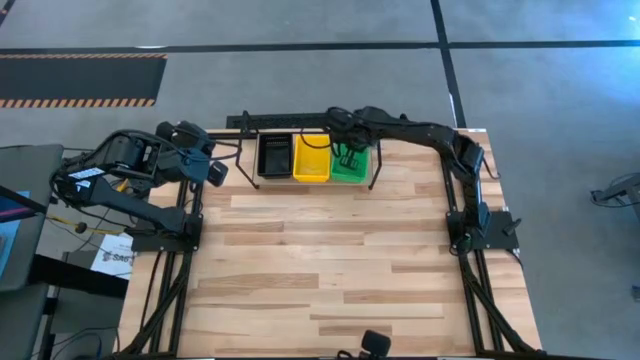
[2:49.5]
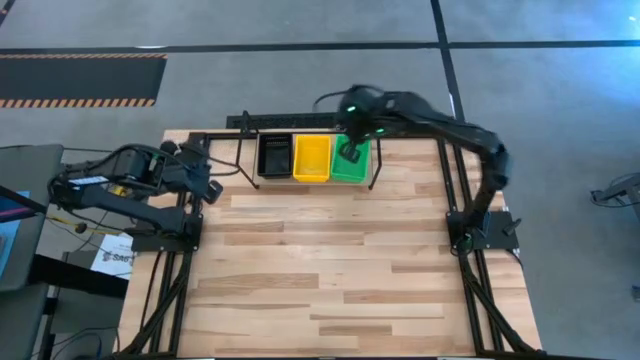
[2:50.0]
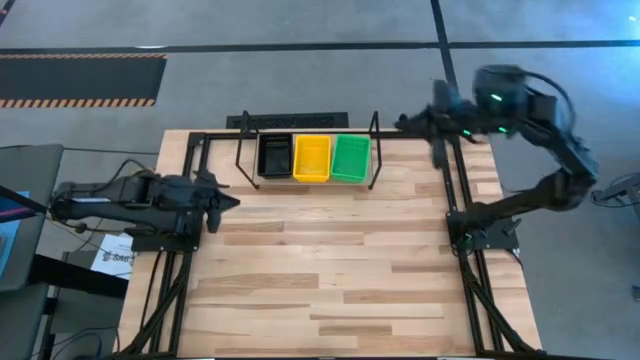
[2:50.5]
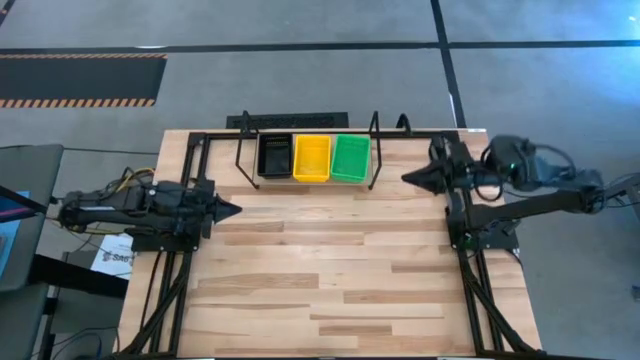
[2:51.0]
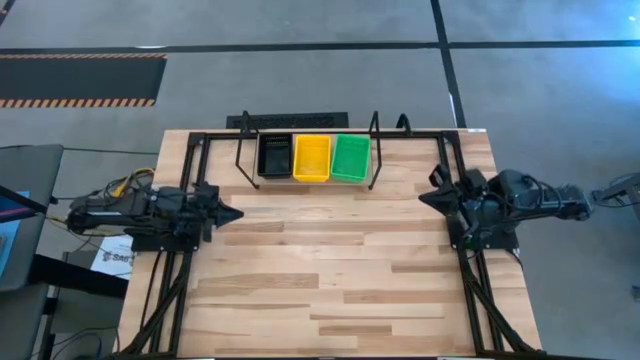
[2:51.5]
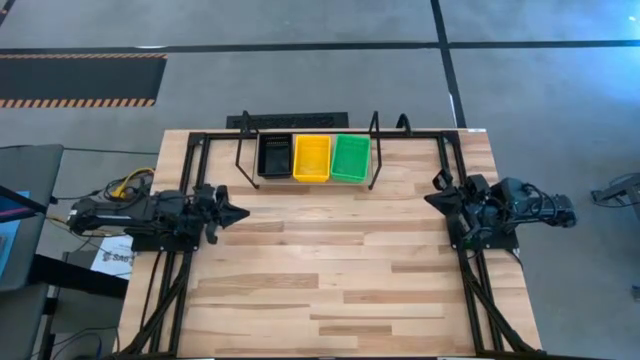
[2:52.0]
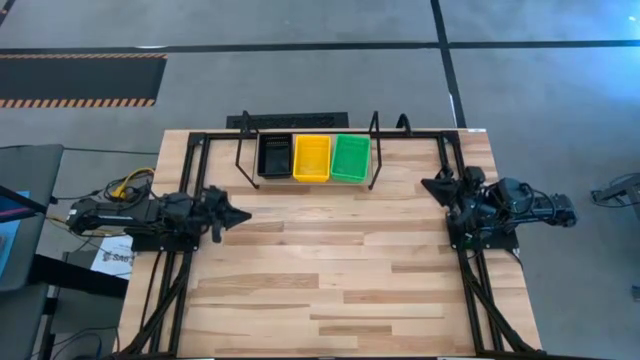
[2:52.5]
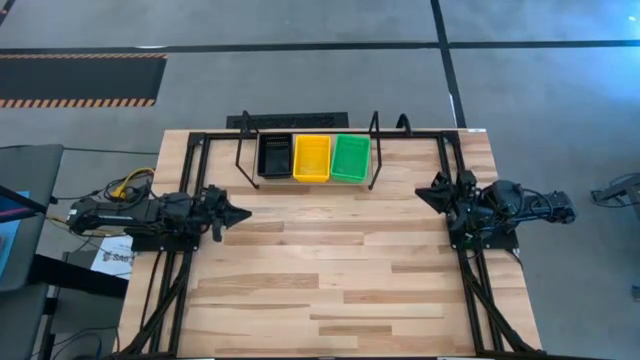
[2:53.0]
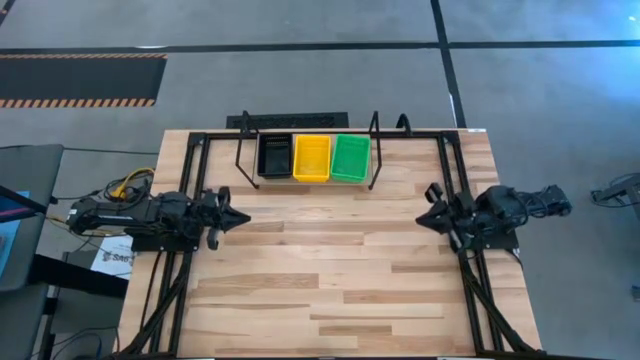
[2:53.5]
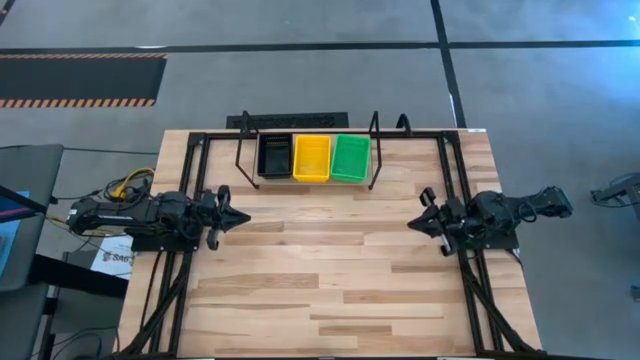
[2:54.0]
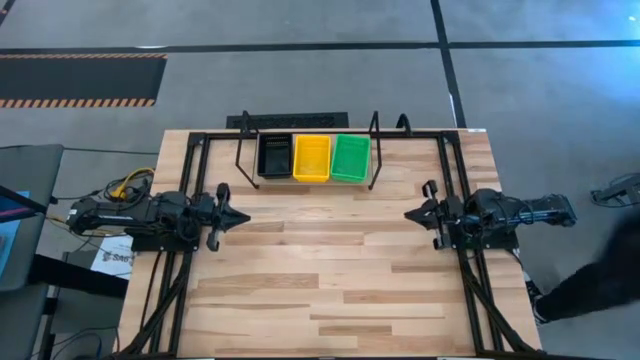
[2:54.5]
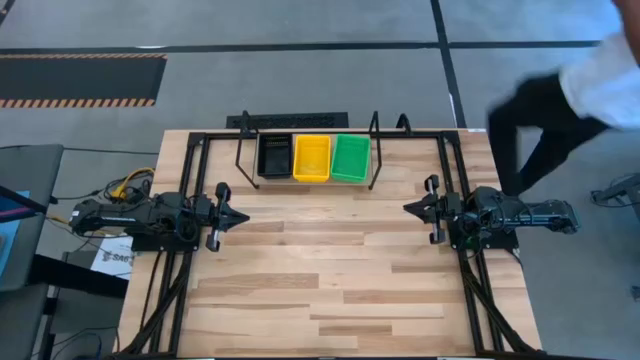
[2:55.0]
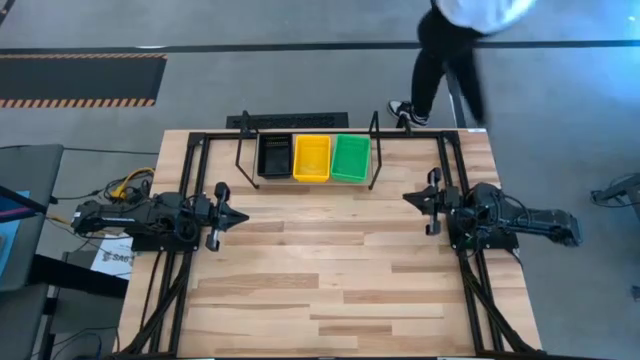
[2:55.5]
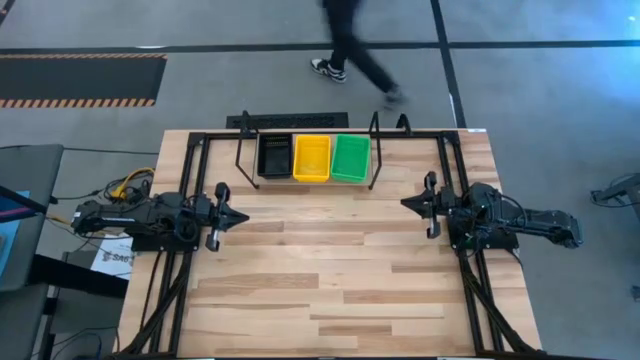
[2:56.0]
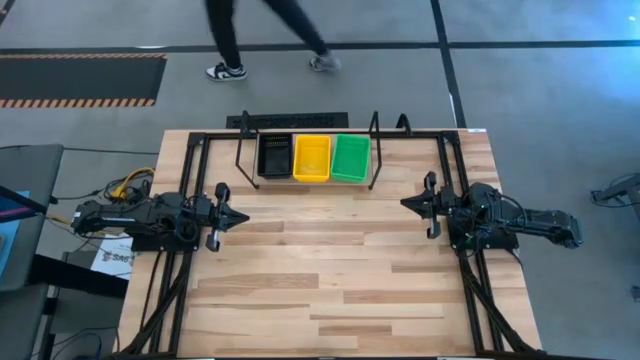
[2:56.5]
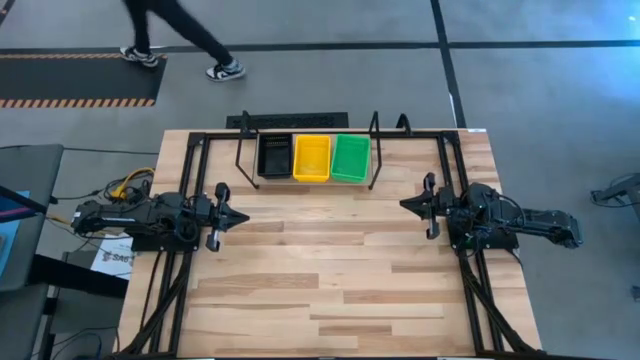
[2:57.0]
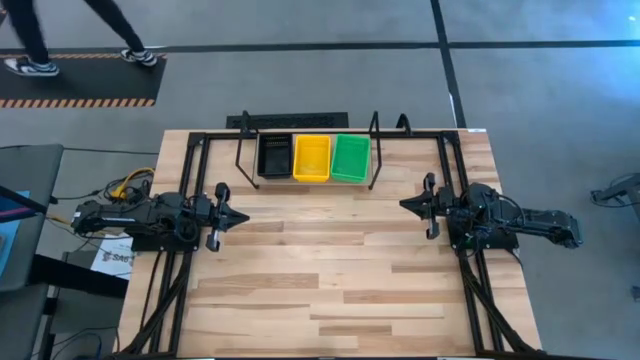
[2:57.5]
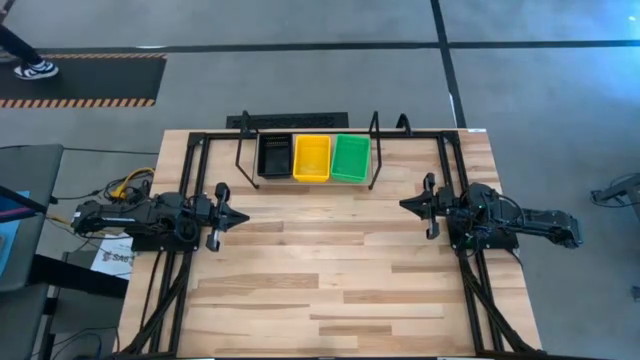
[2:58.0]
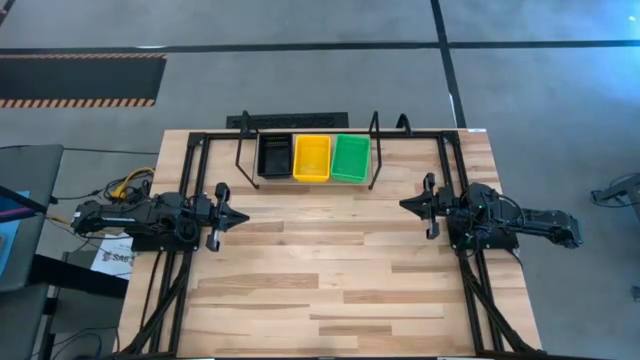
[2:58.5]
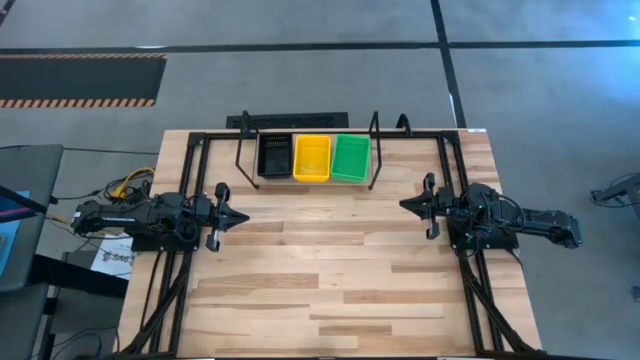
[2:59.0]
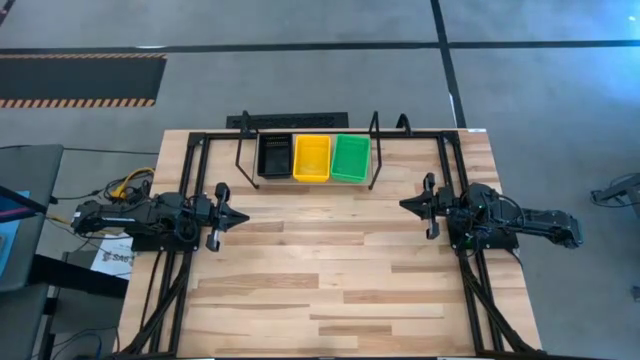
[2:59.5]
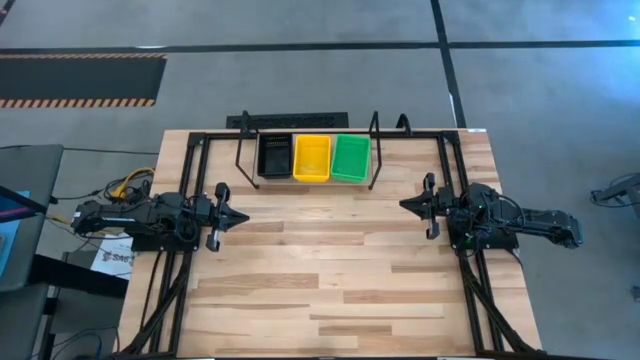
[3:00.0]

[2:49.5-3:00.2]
Task: Stack baskets on shelf by color
Return to Home Position

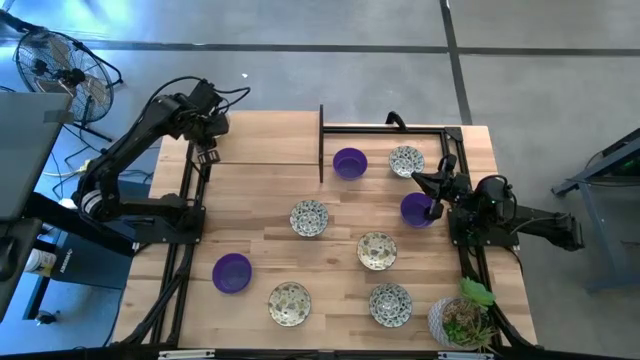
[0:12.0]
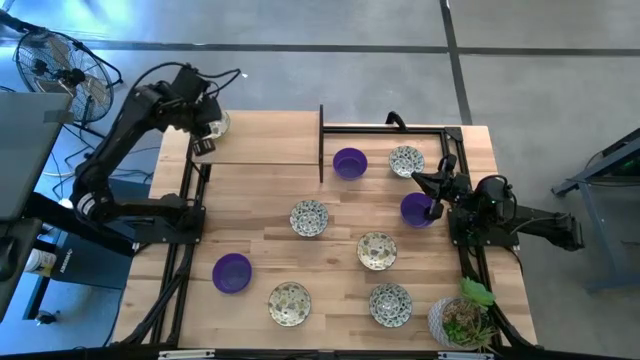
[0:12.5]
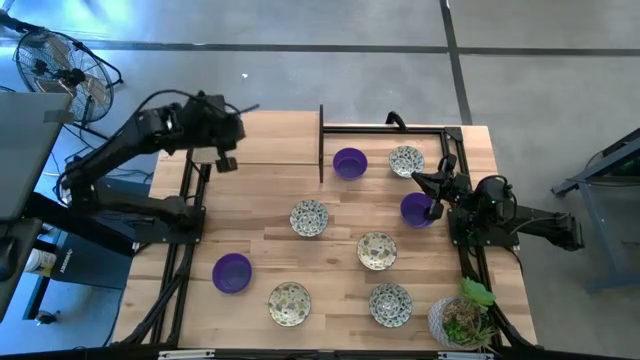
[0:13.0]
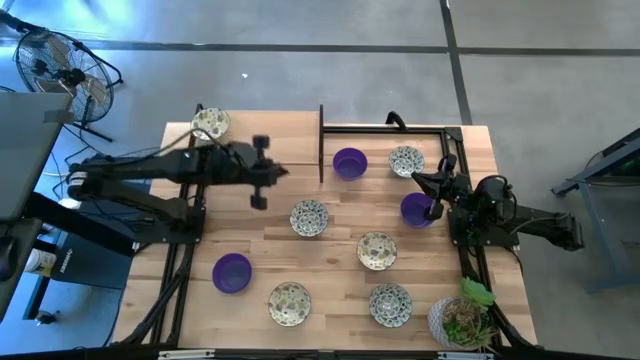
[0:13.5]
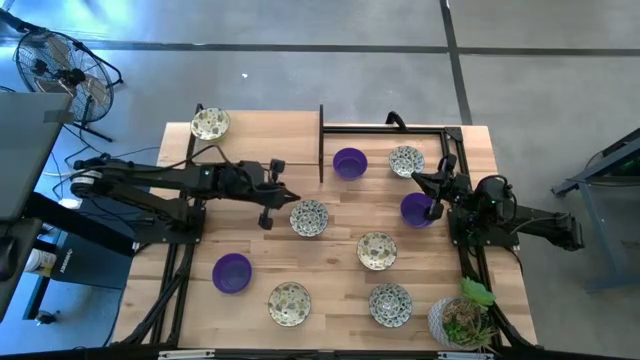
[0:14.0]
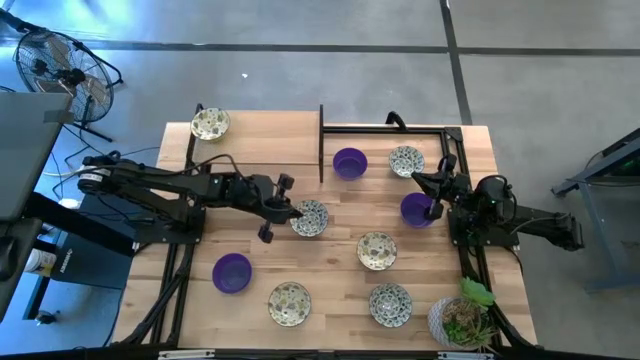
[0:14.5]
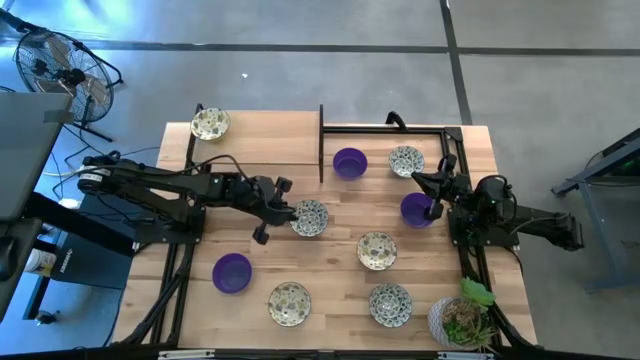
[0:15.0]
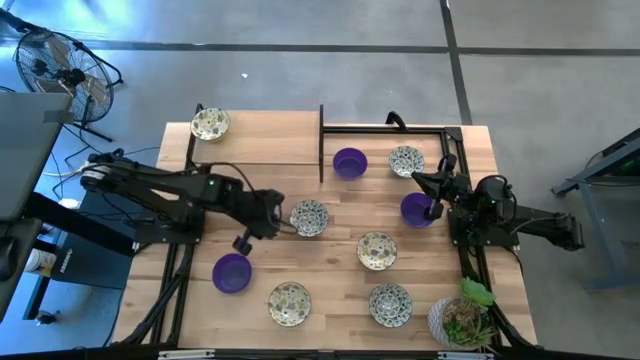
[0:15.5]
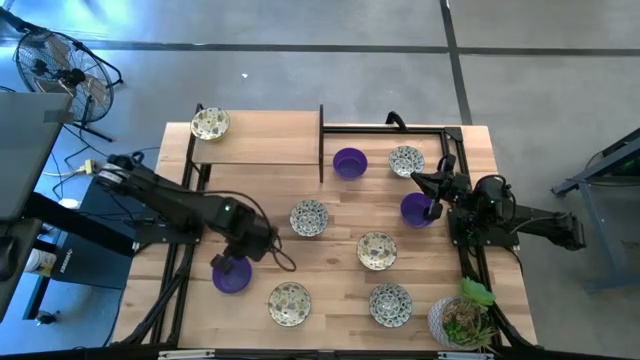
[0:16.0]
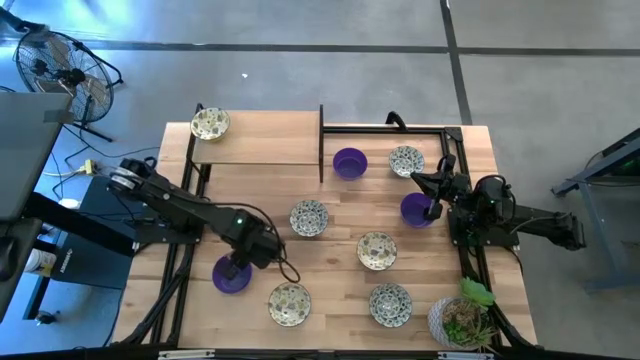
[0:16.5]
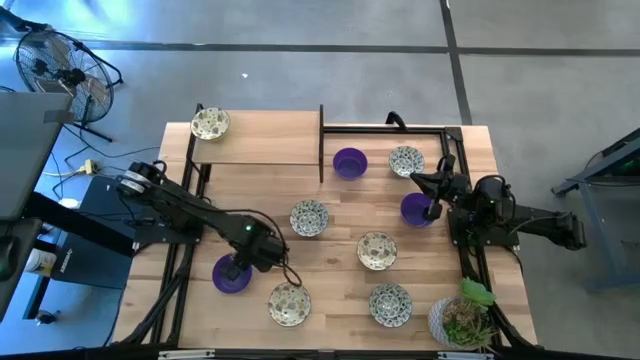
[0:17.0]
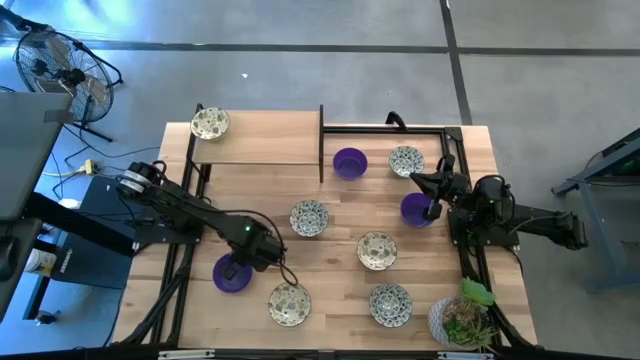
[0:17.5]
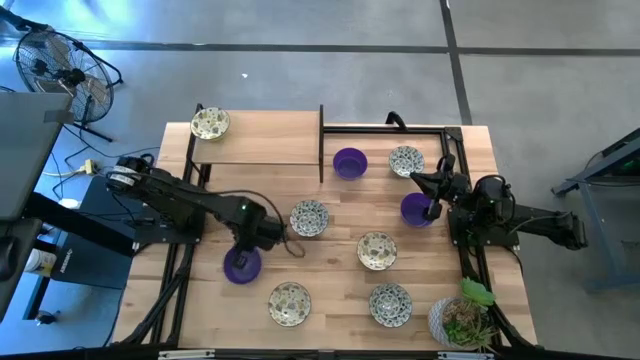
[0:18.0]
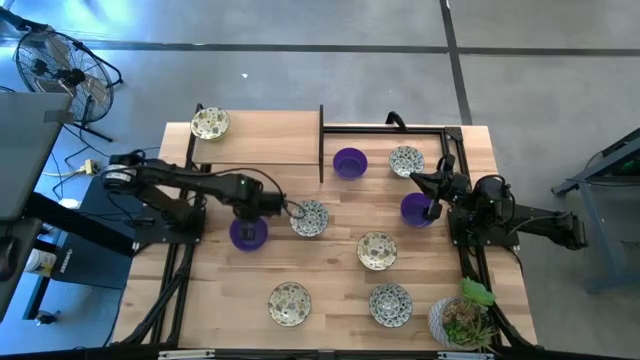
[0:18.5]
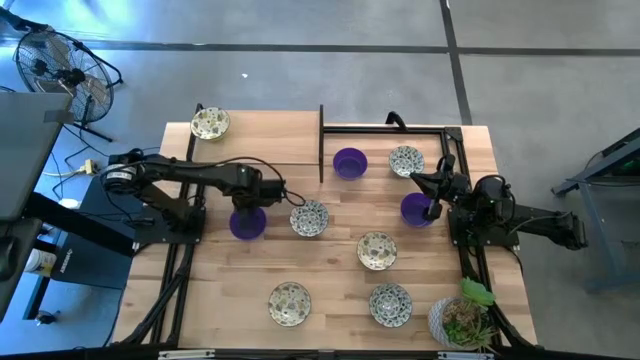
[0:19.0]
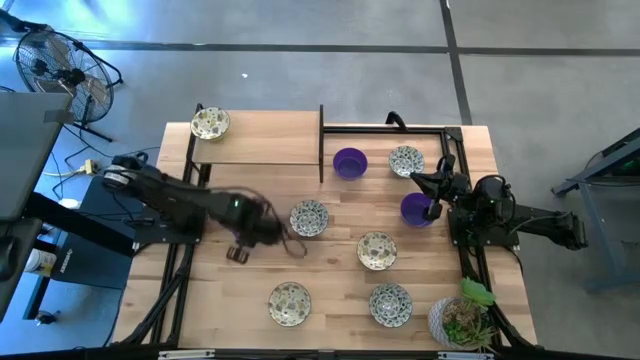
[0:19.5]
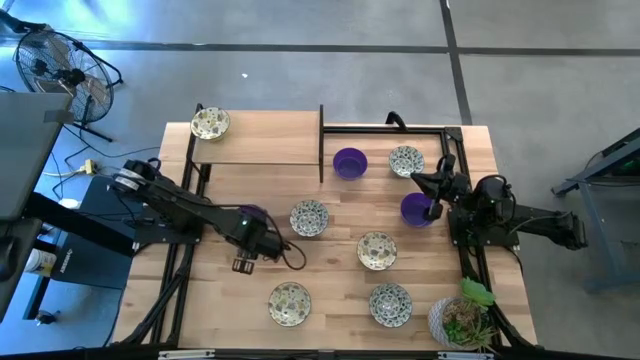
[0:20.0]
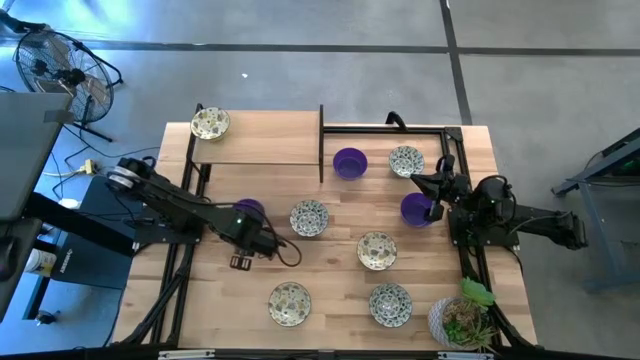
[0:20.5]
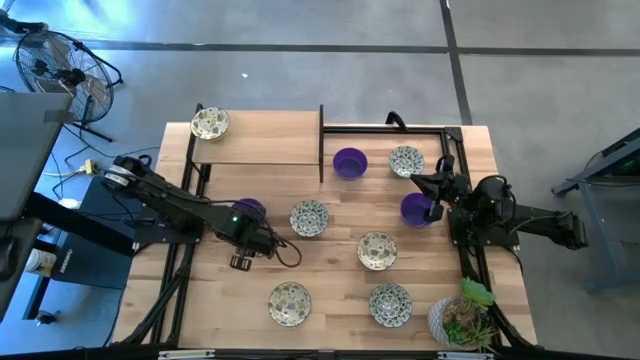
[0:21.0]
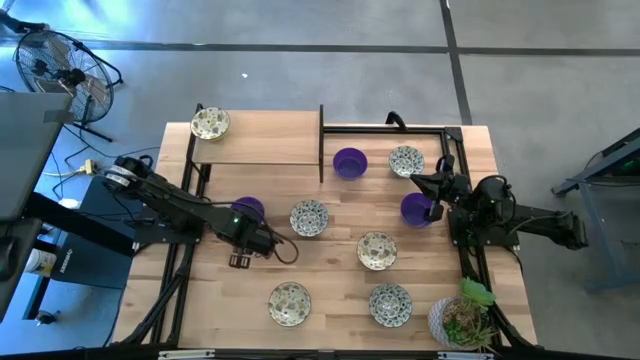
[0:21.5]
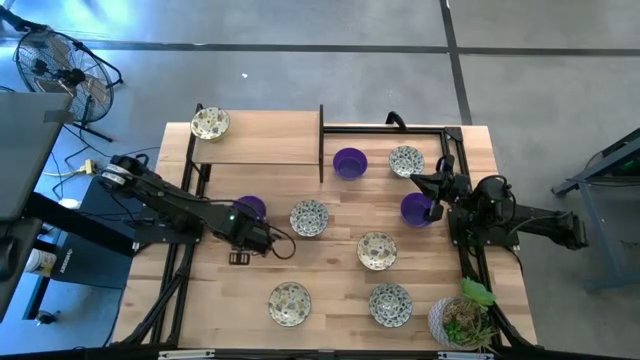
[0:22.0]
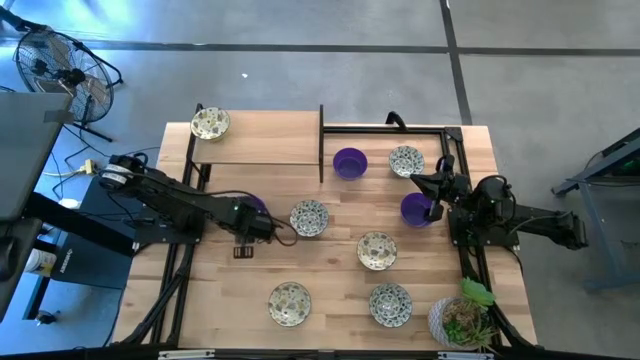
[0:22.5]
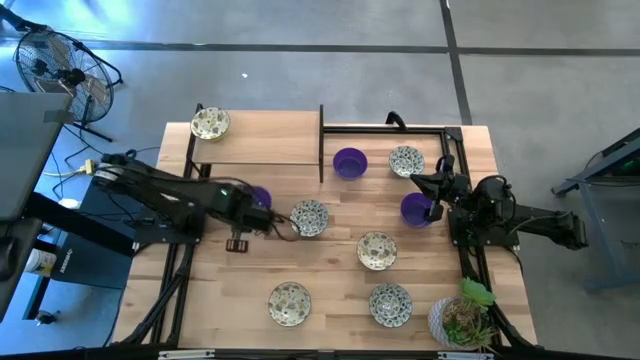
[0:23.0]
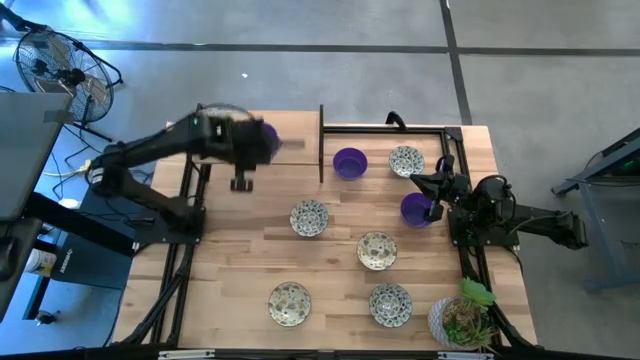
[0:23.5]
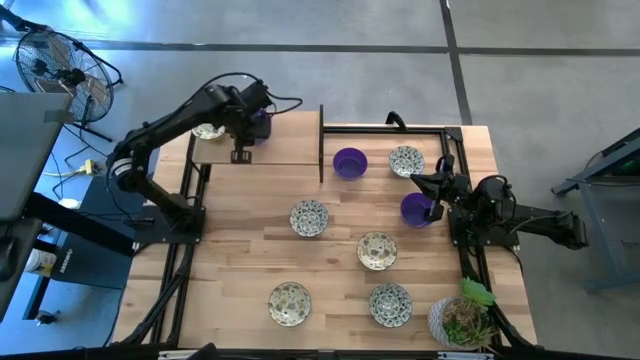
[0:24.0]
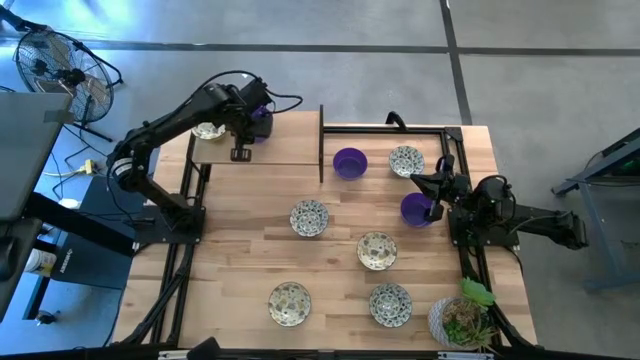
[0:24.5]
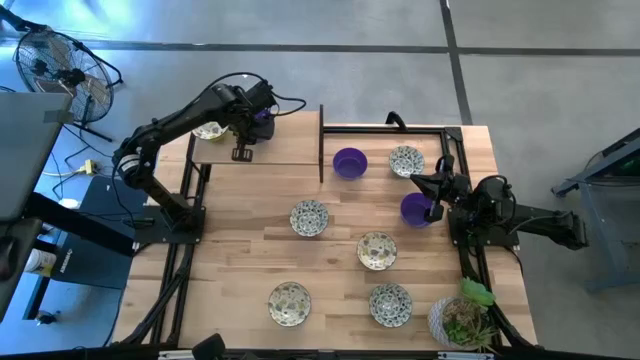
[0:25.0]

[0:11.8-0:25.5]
Task: Pick & Place Mini bowls
Put the bottom left blue bowl on the shelf
